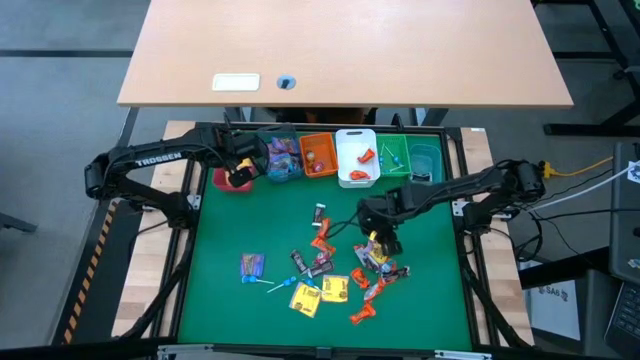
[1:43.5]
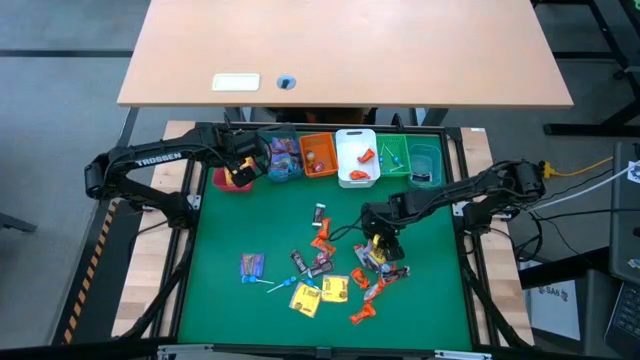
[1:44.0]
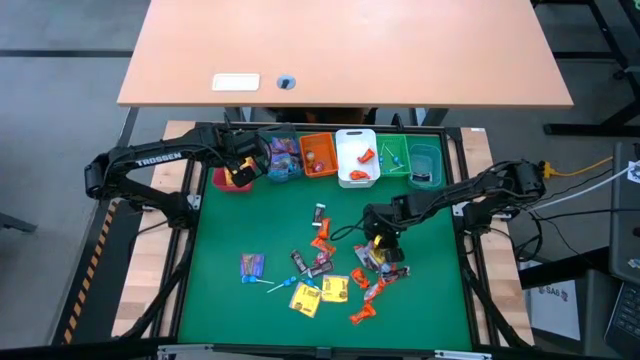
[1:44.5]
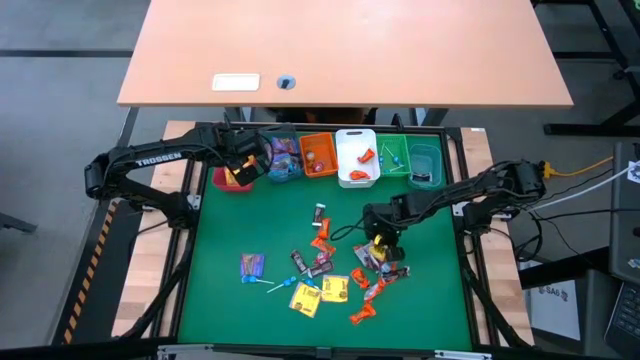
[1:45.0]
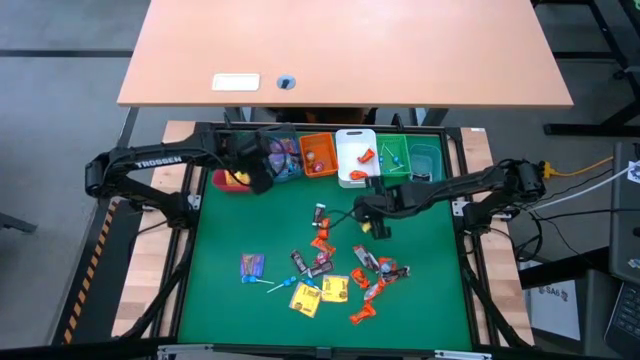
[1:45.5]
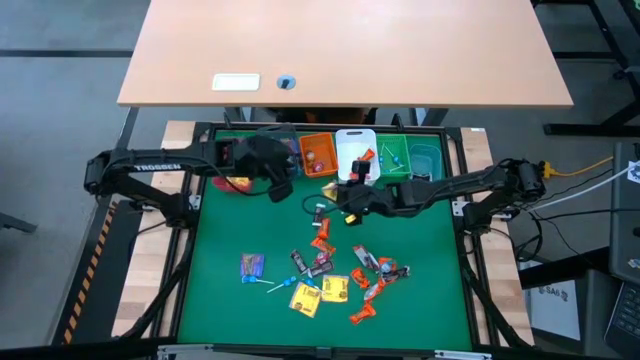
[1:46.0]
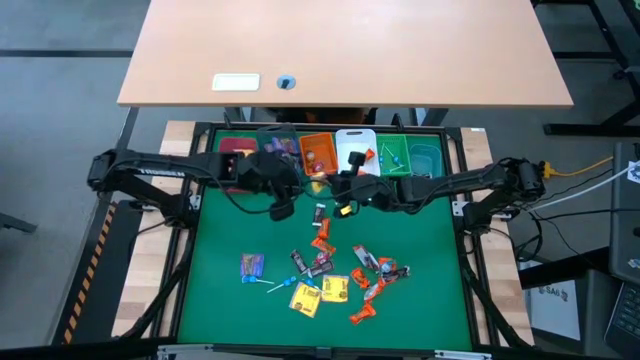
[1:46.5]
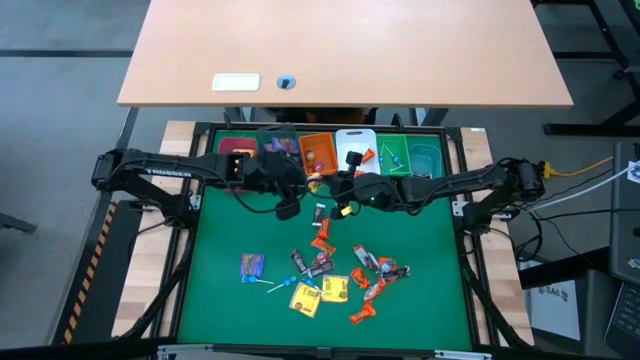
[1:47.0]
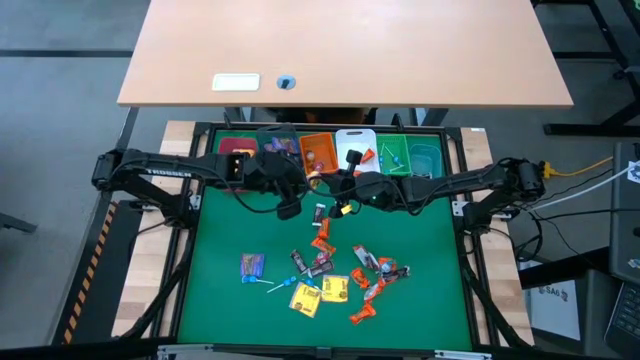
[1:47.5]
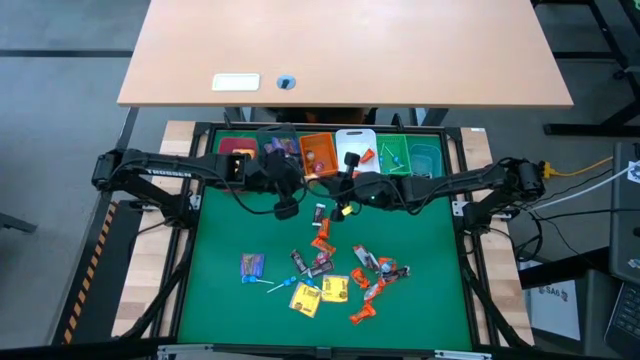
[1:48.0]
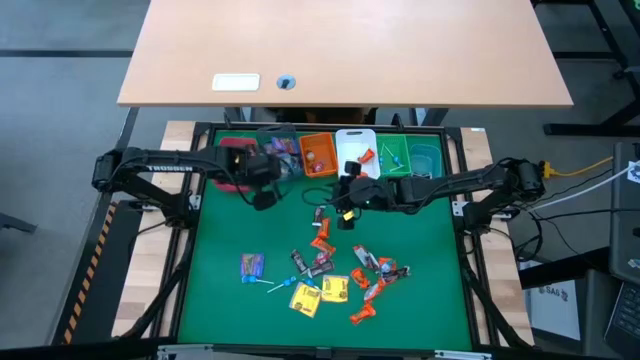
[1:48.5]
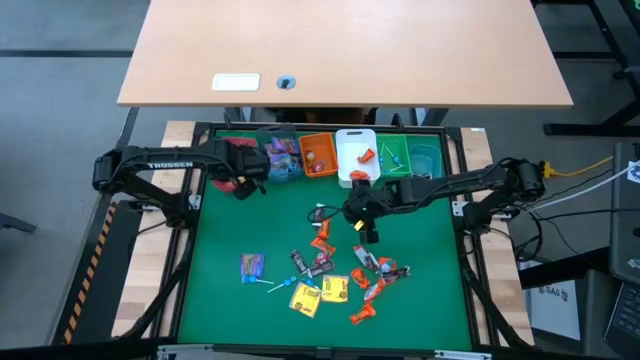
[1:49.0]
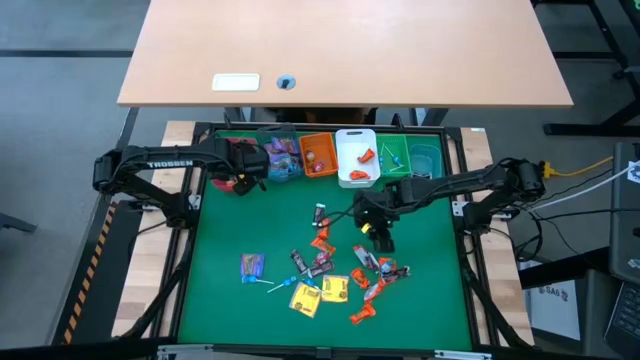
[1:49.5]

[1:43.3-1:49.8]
Task: Sort candy
Put the yellow candy into the red bin

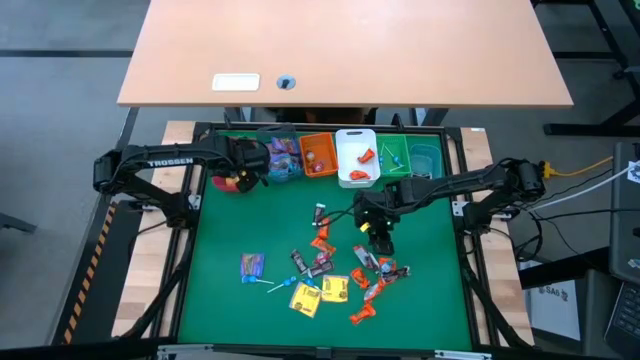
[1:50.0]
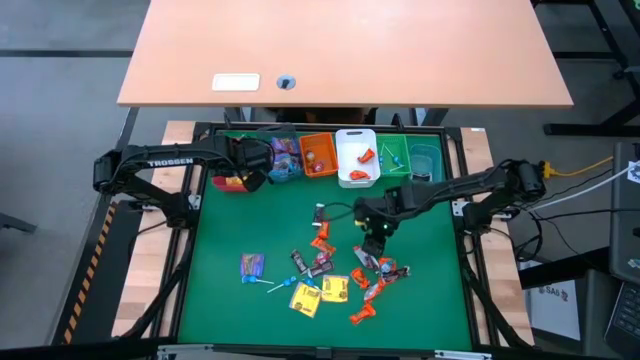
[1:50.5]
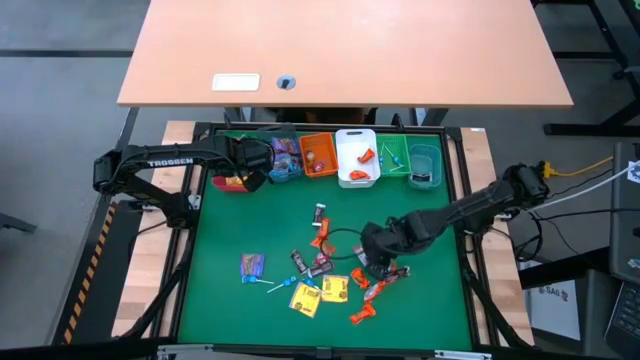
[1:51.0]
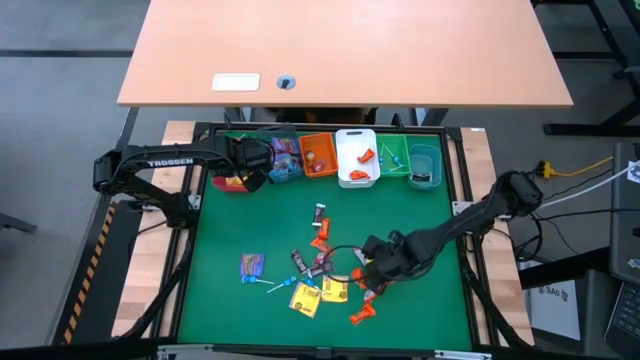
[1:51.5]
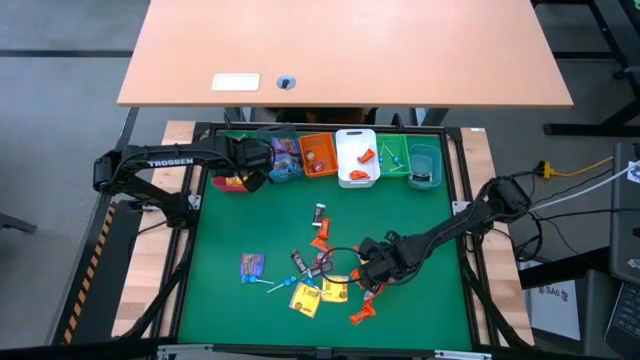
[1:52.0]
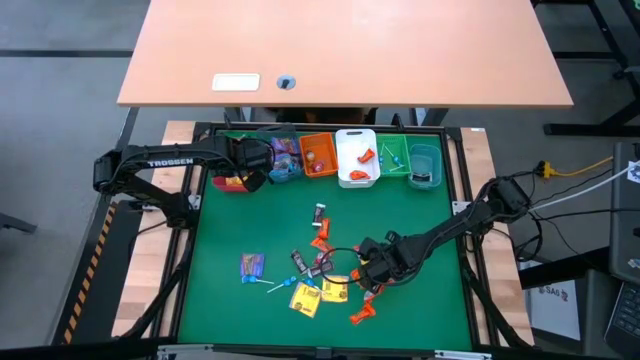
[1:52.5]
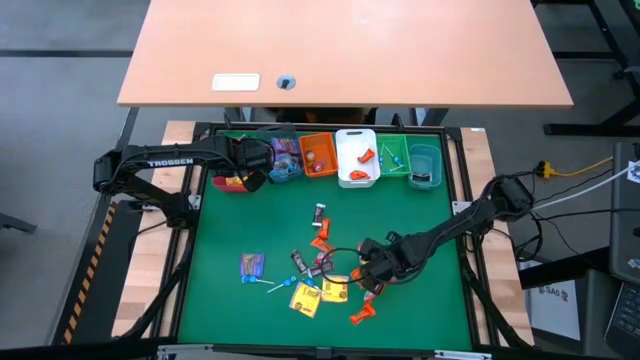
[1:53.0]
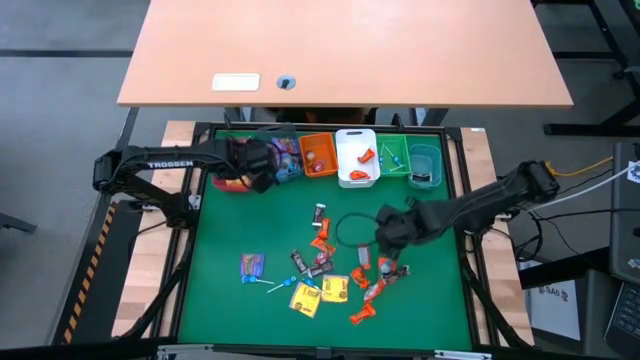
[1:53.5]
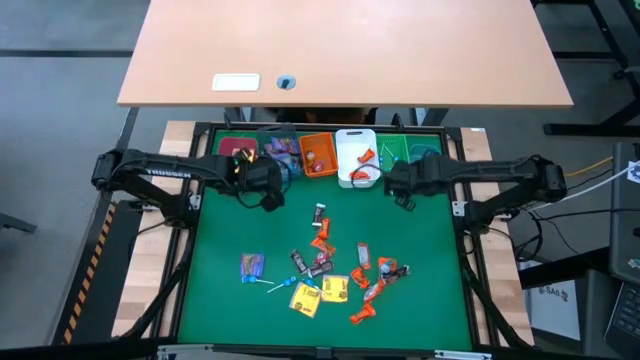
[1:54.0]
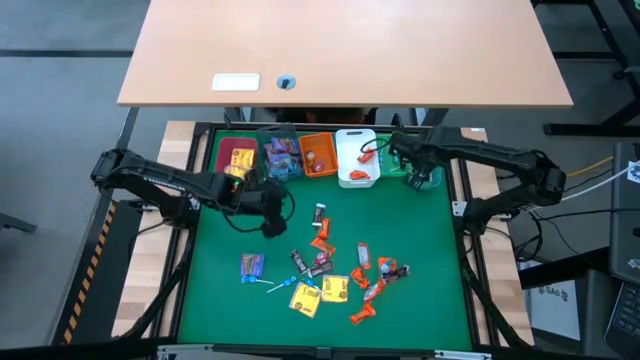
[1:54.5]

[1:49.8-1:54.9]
Put the brown chocolate into the blue bin

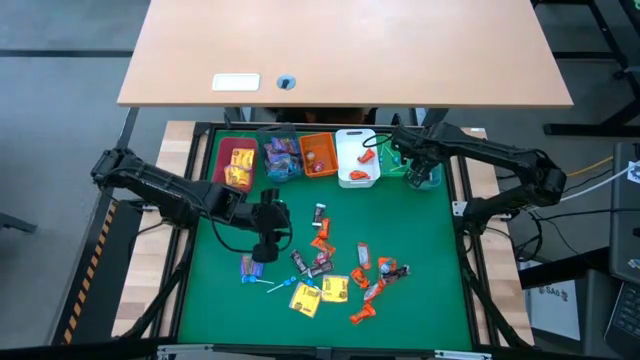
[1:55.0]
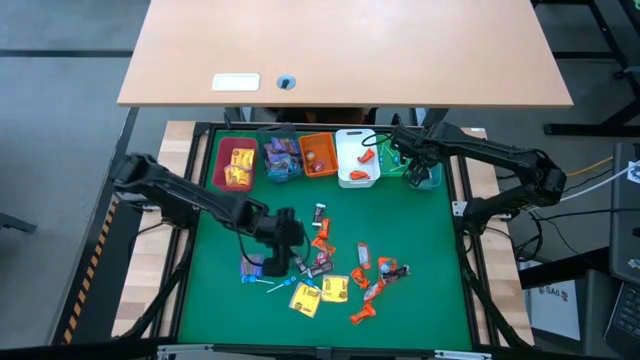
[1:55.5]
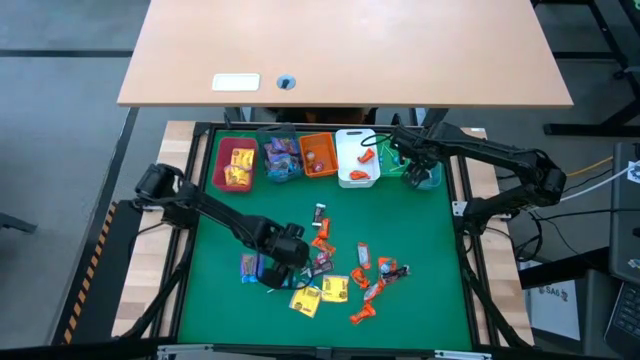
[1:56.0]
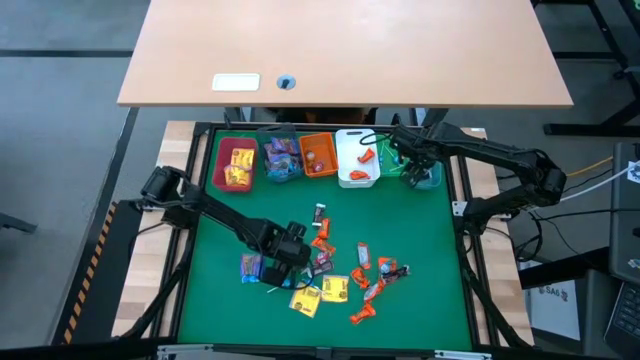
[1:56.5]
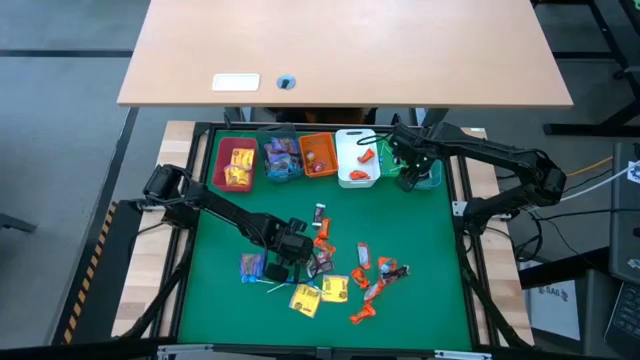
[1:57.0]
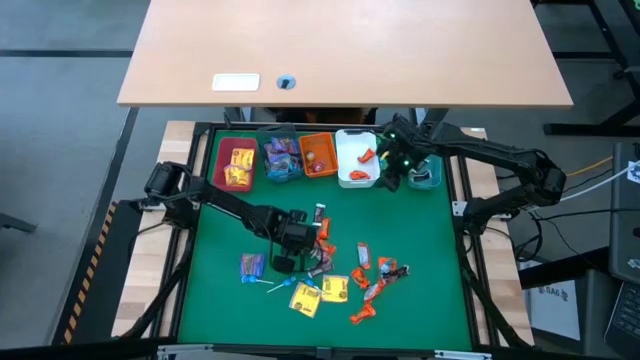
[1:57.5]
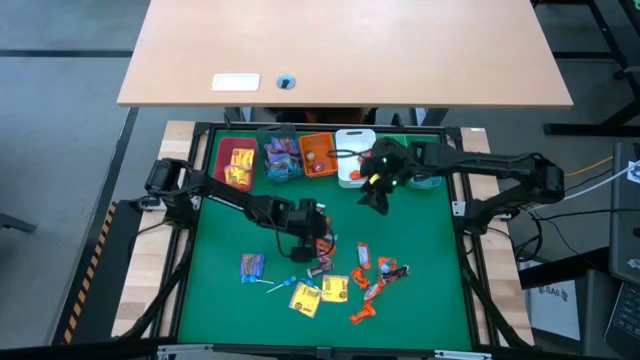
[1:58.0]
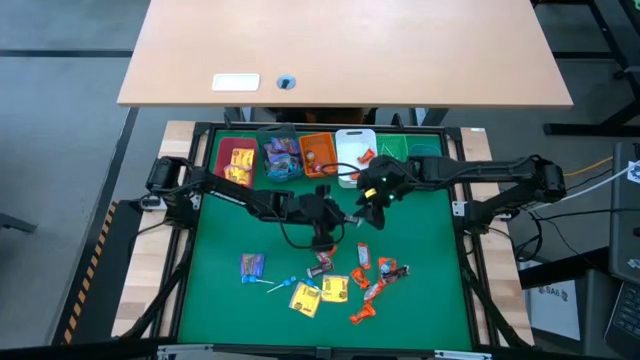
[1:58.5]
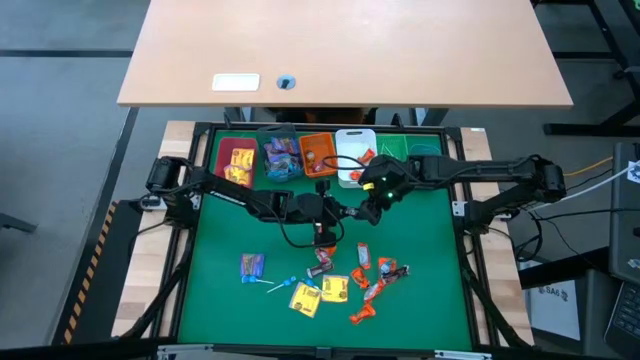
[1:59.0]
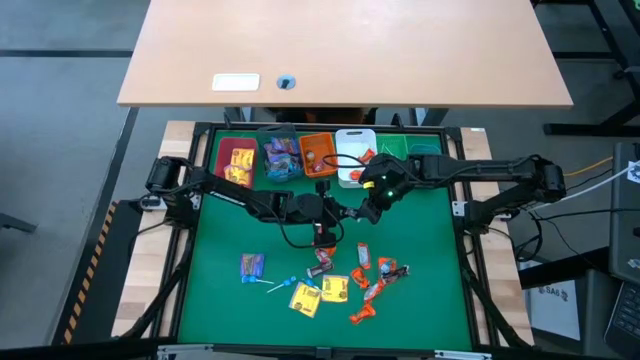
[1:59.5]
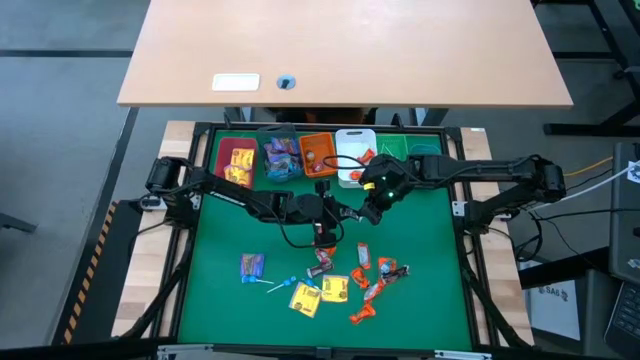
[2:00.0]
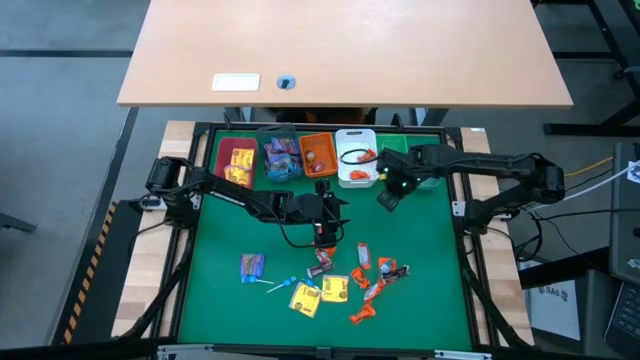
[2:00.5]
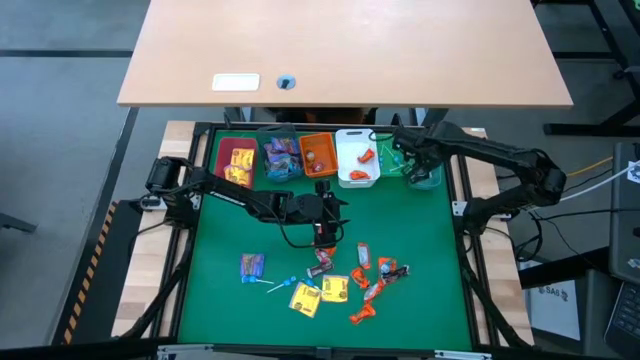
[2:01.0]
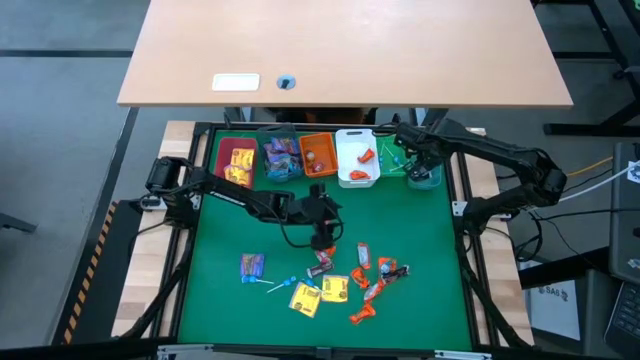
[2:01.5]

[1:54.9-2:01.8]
Put the brown chocolate into the blue bin

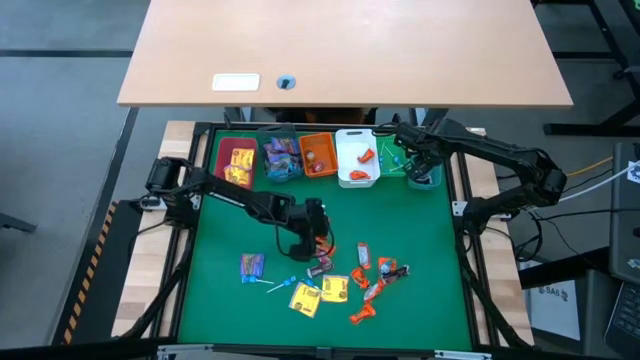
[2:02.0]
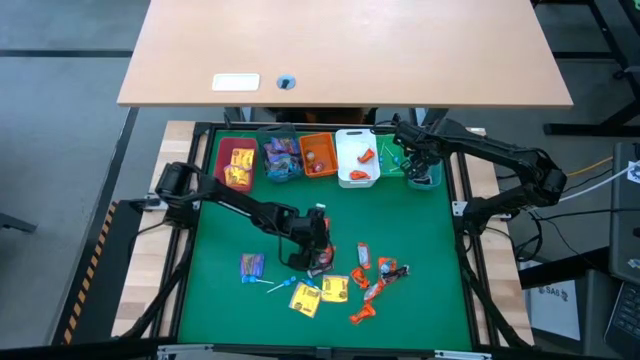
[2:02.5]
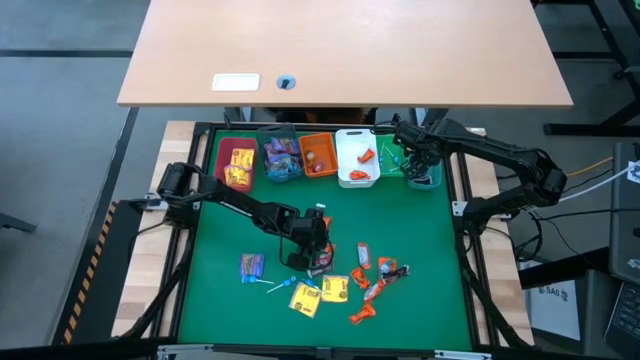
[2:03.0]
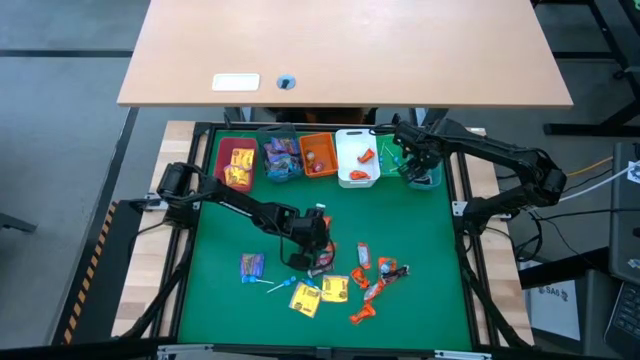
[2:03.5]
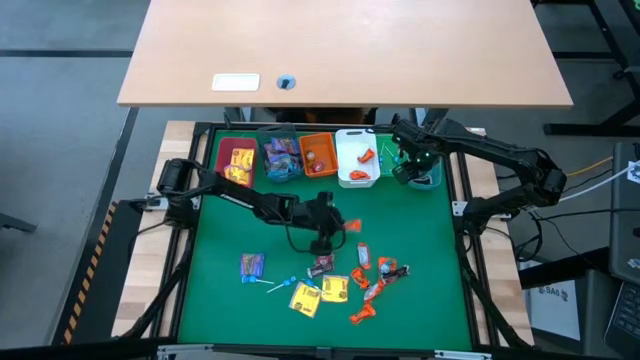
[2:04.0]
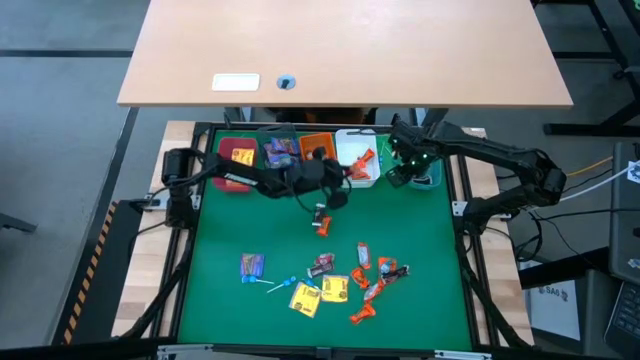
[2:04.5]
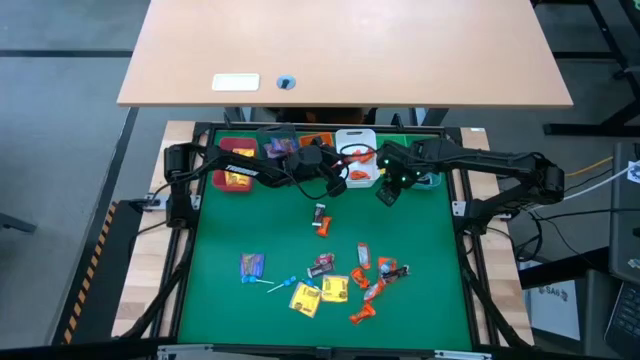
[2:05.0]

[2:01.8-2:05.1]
Put the orange chocolate into the white bin
